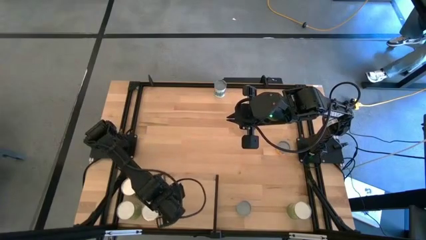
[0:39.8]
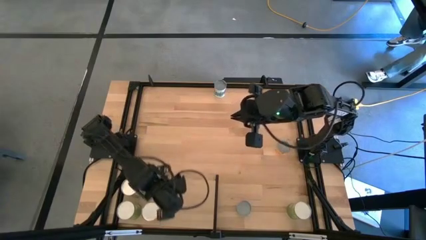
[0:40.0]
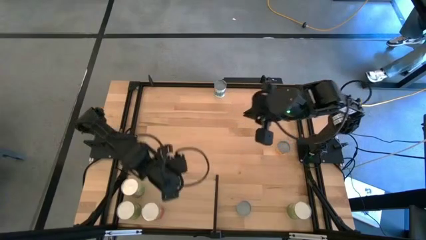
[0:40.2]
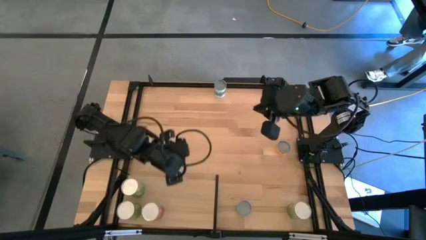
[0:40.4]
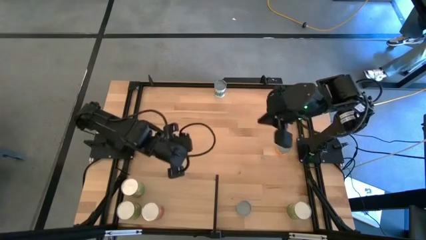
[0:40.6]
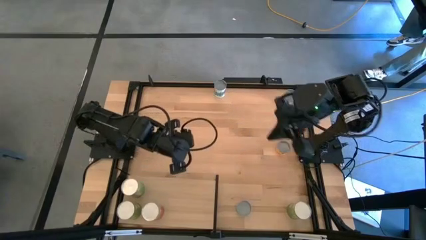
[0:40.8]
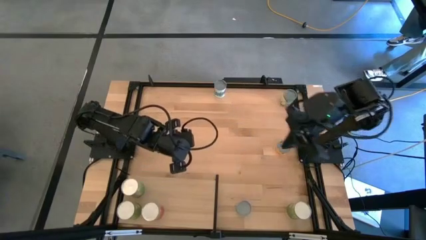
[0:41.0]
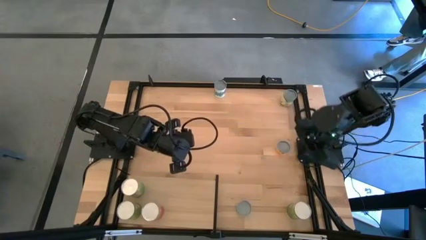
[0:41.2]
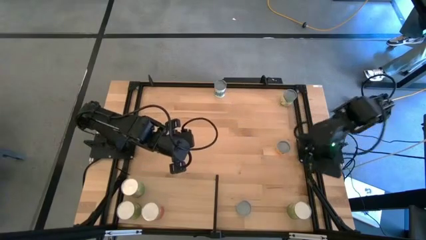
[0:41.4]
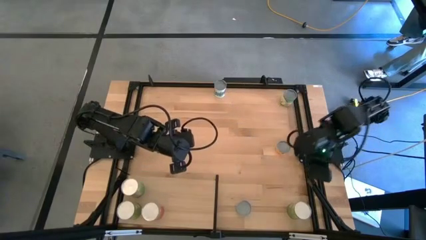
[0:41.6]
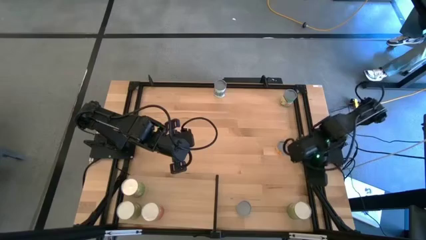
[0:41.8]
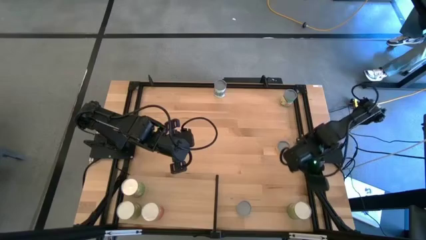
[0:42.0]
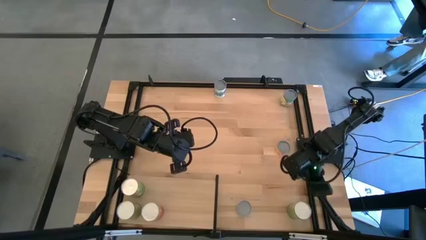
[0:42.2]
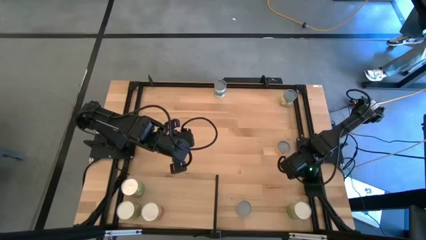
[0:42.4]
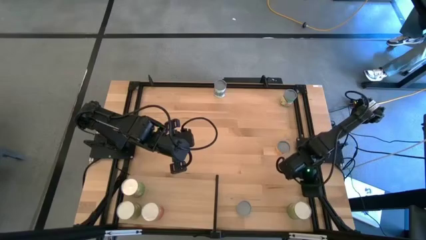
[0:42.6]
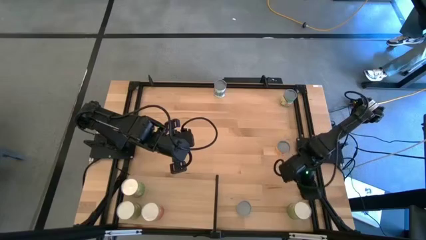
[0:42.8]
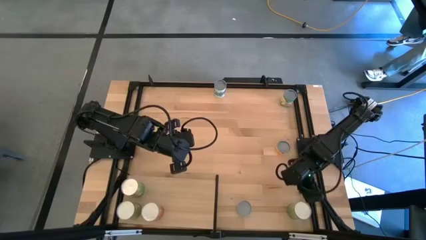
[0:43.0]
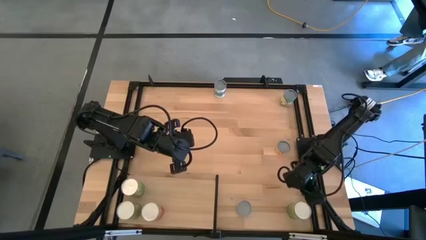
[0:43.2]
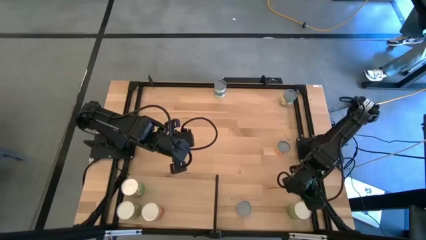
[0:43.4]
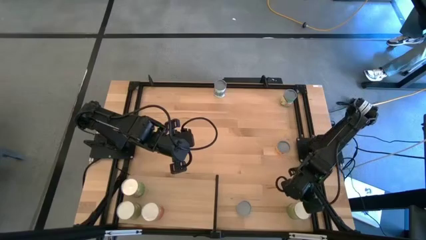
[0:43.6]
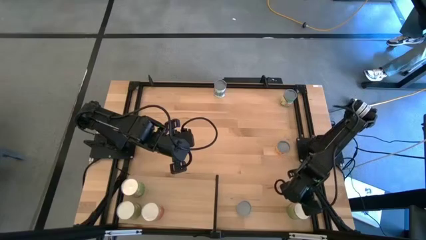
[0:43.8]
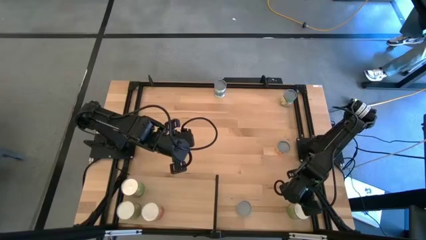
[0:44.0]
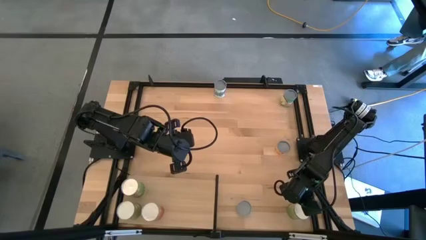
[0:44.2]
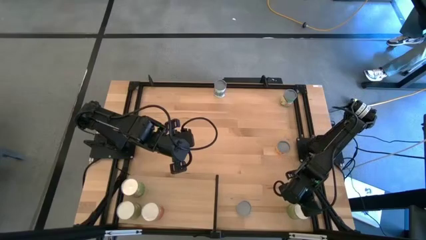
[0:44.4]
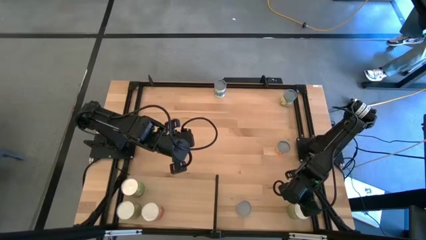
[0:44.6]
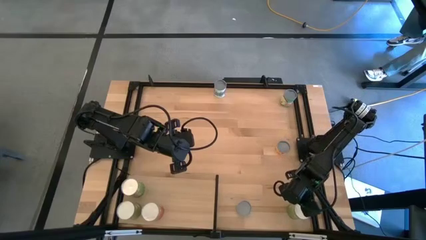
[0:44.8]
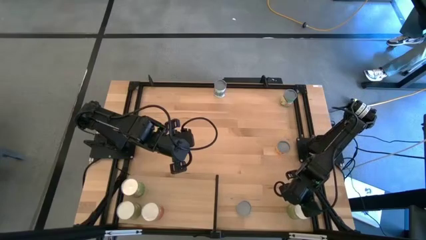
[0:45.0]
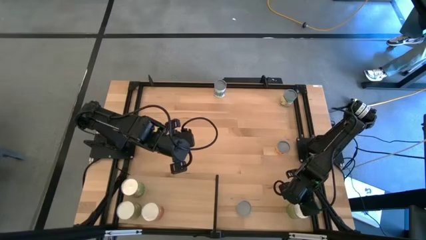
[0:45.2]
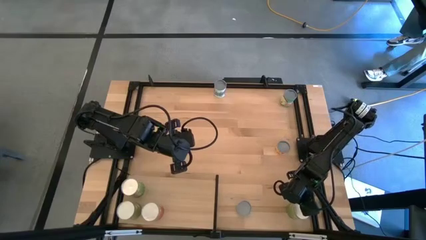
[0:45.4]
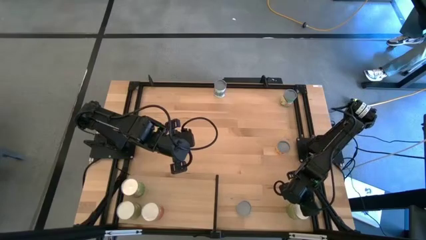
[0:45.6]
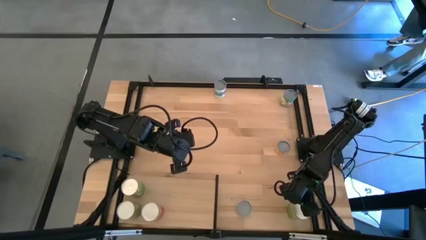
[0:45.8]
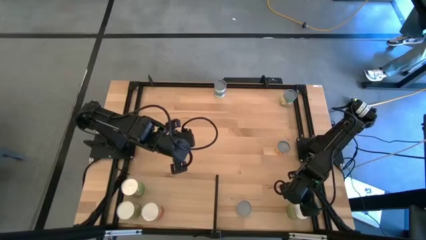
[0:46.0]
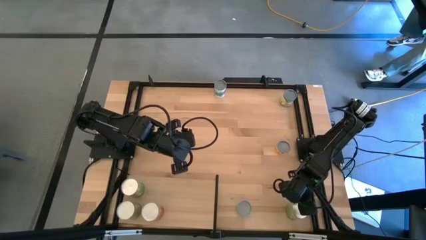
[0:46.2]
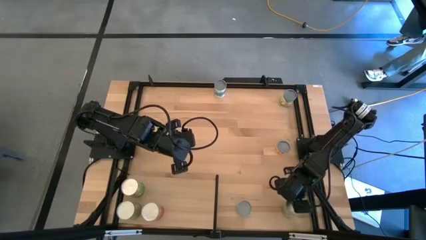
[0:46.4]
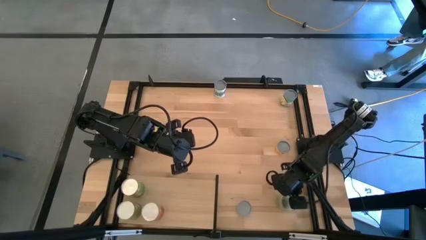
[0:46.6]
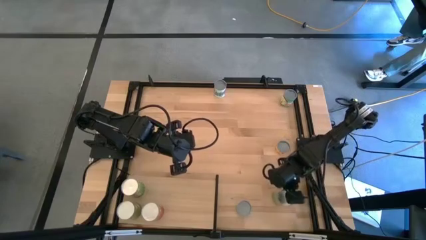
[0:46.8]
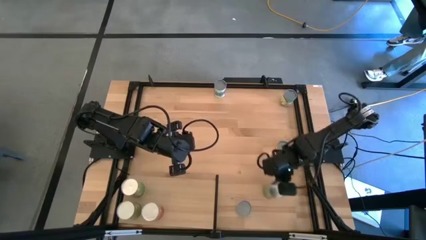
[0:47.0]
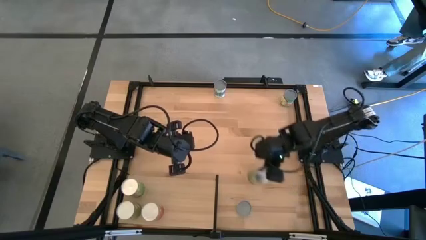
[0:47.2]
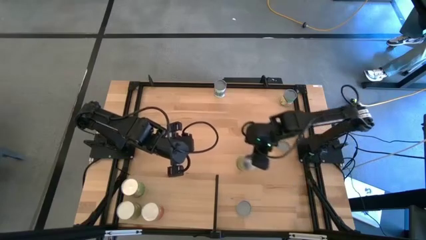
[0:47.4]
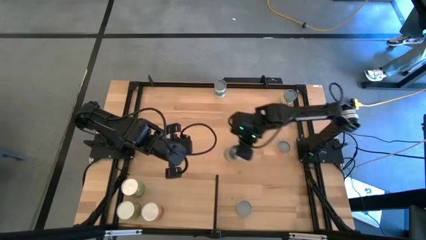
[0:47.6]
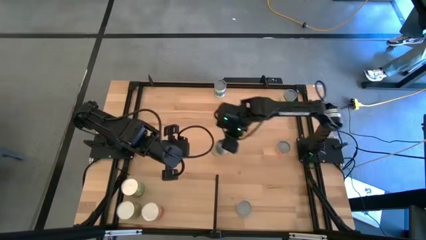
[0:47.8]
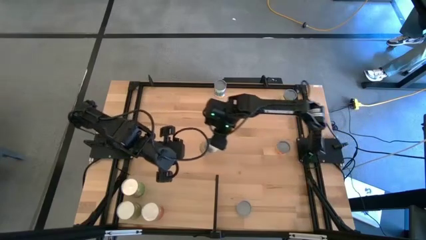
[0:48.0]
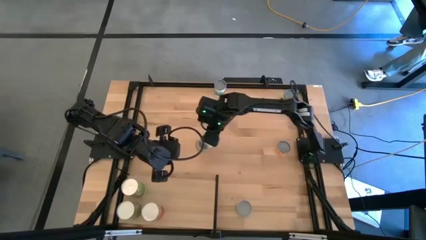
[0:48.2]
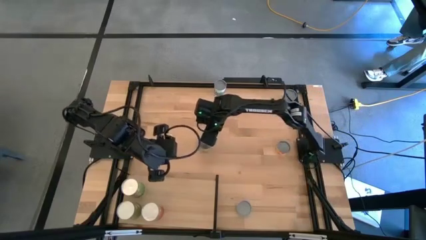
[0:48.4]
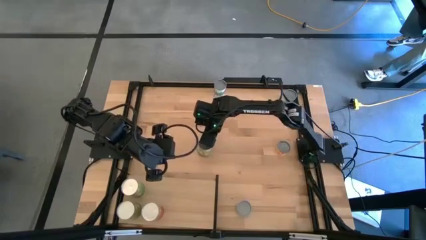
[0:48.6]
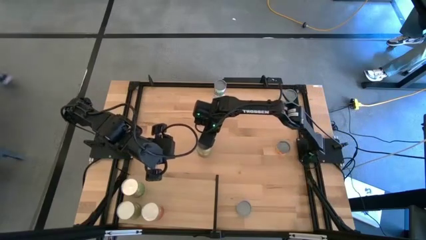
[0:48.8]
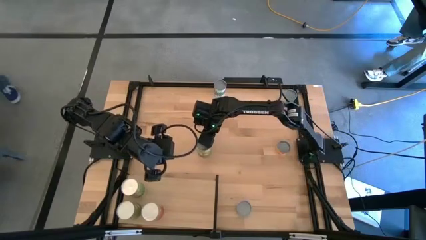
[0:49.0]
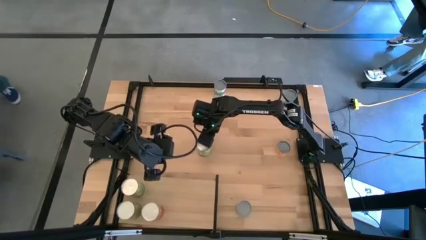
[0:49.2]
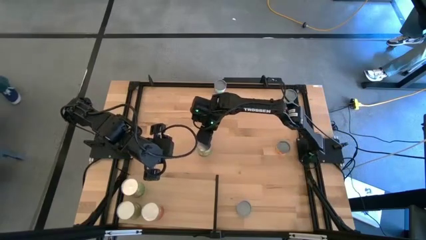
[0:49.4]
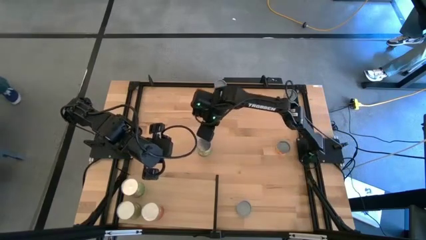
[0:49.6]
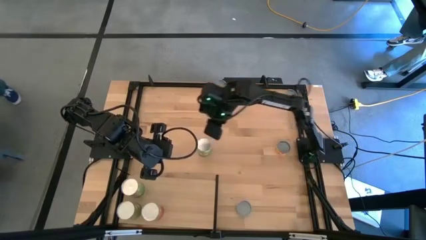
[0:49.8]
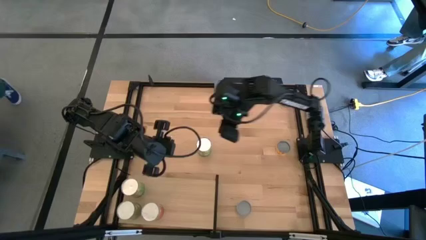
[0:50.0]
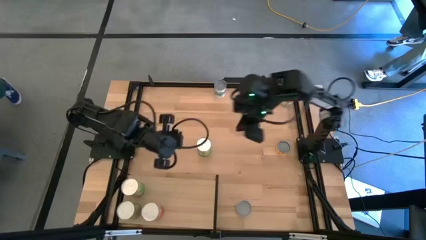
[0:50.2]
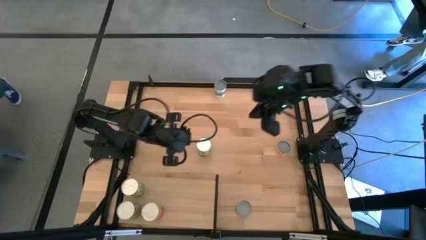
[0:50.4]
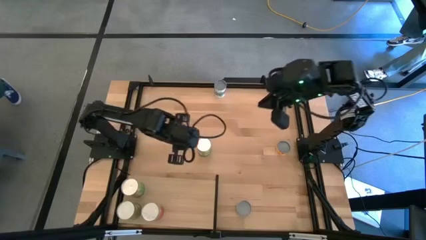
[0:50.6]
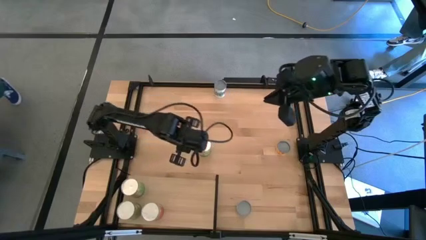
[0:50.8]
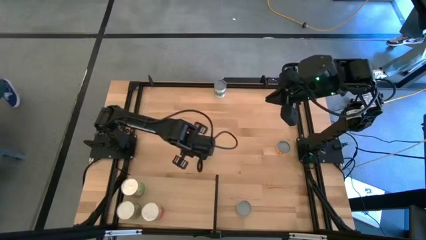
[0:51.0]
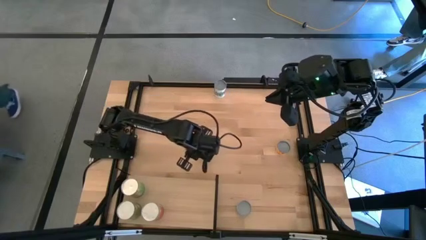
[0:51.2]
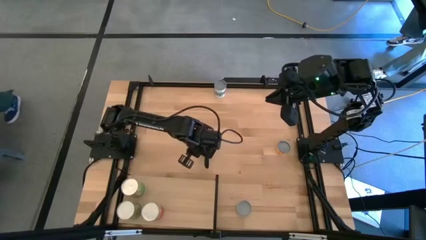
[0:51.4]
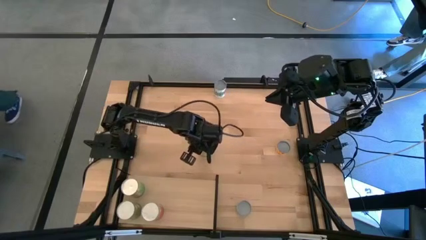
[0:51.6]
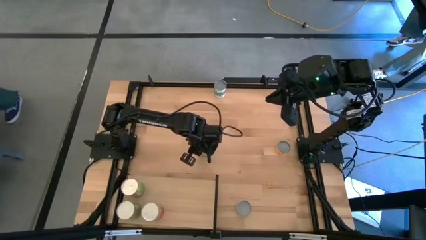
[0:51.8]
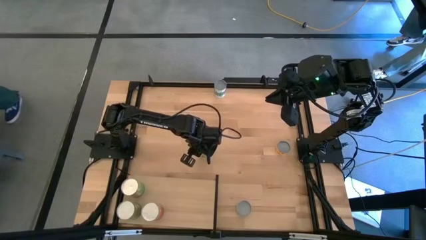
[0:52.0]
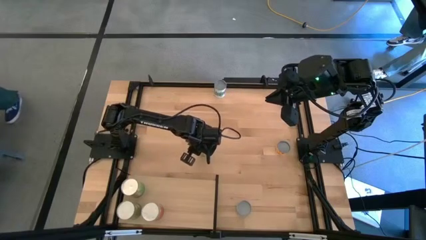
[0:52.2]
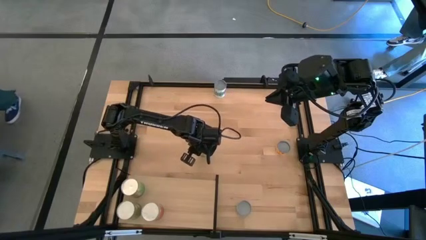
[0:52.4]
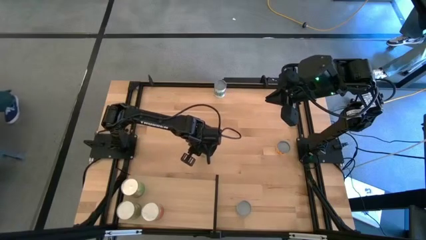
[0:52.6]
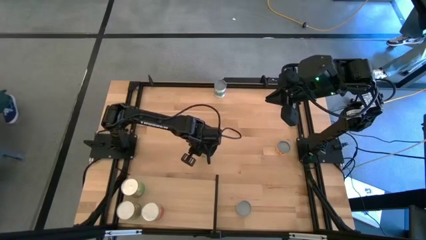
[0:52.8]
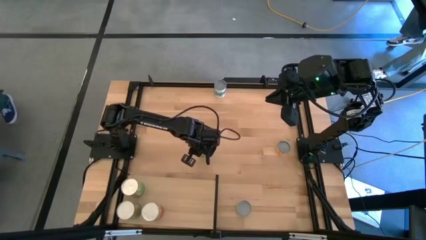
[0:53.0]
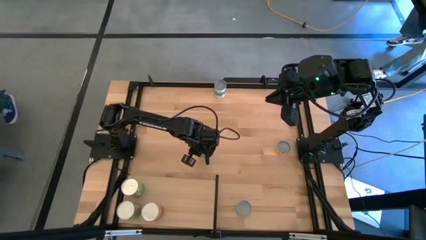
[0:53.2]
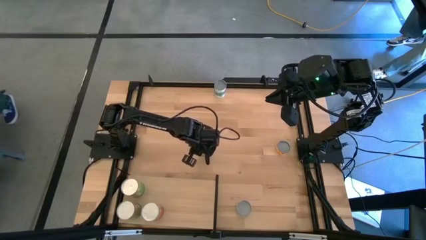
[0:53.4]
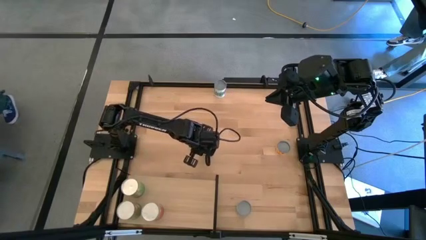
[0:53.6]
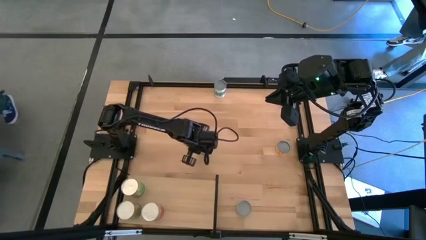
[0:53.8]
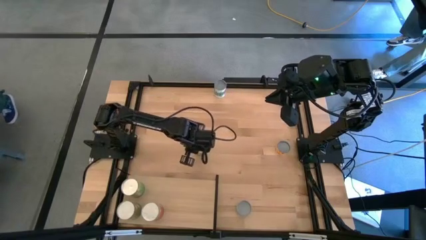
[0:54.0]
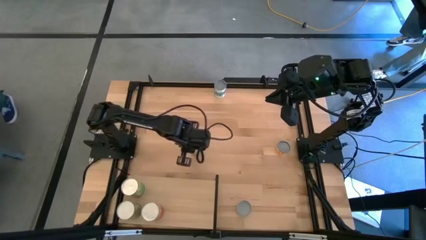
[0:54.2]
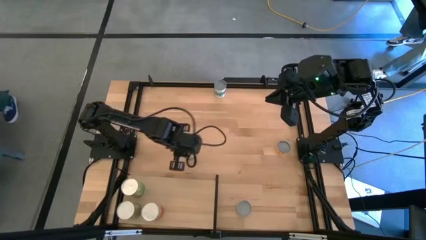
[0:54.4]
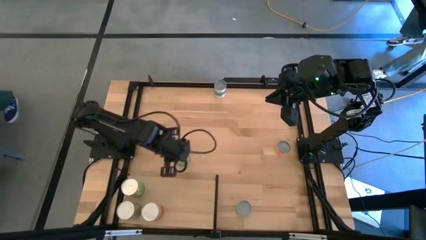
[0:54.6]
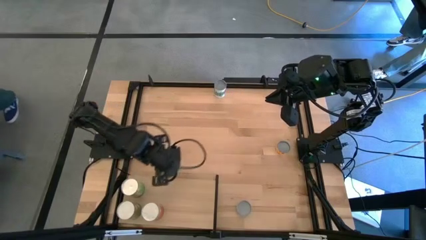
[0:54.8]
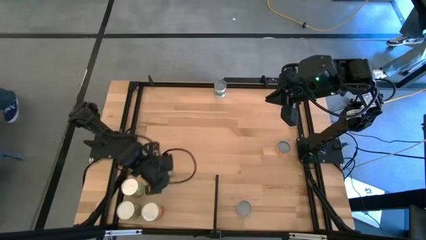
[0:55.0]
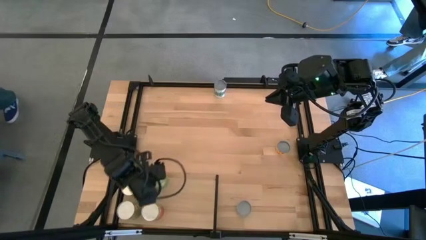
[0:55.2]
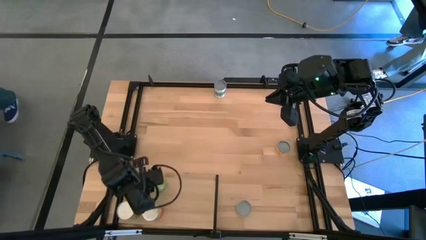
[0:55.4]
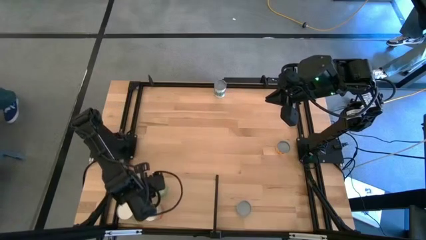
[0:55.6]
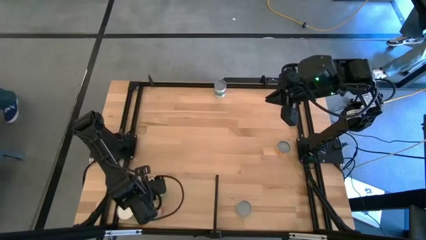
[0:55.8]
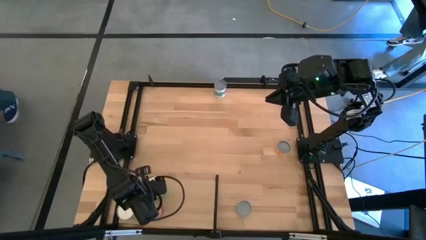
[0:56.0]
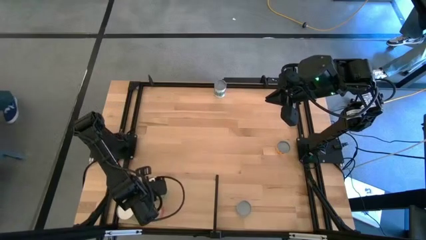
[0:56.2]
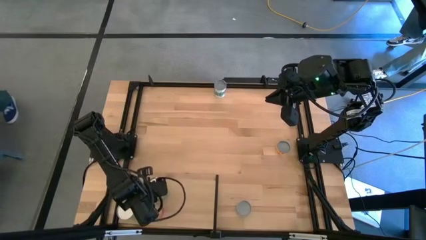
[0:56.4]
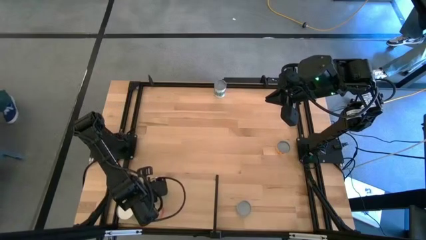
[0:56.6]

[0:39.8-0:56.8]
Task: Pick and place cans onto a shelf
Put the canned peaches on the shelf
